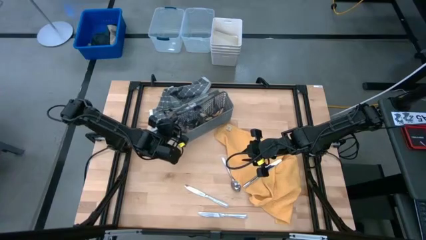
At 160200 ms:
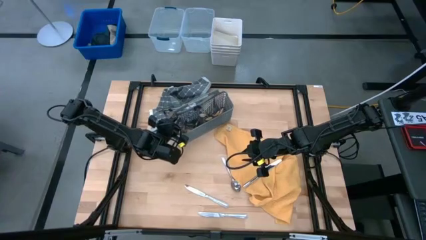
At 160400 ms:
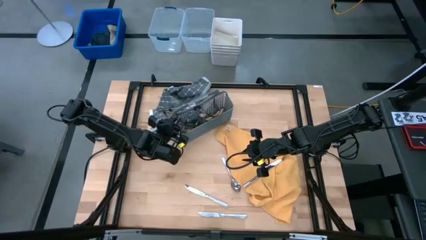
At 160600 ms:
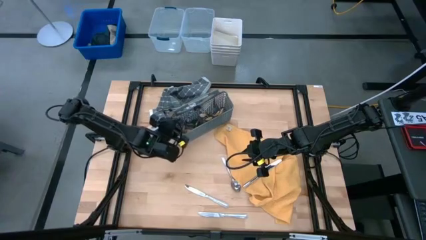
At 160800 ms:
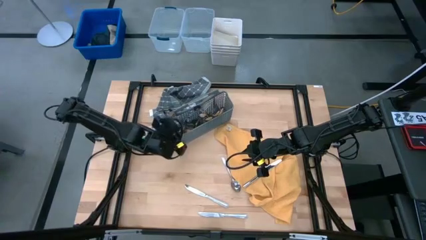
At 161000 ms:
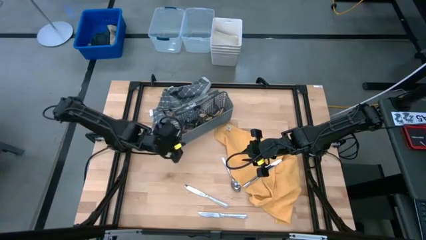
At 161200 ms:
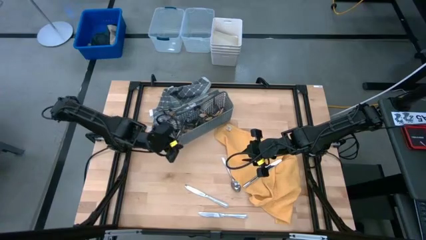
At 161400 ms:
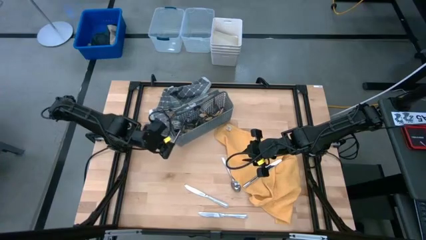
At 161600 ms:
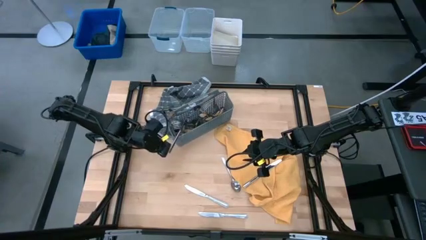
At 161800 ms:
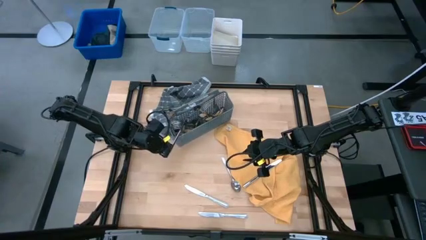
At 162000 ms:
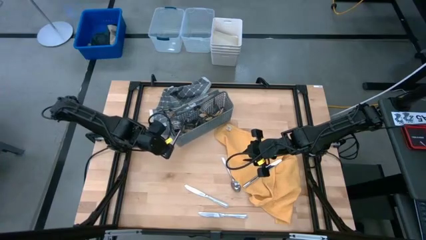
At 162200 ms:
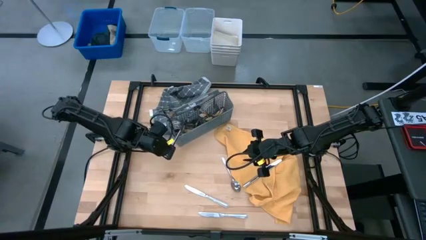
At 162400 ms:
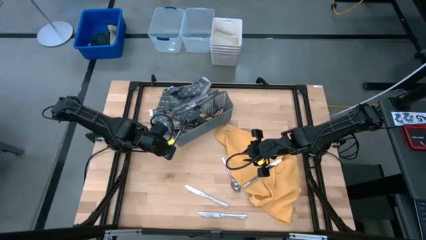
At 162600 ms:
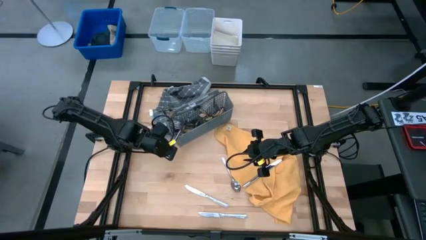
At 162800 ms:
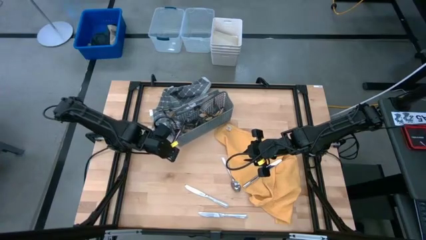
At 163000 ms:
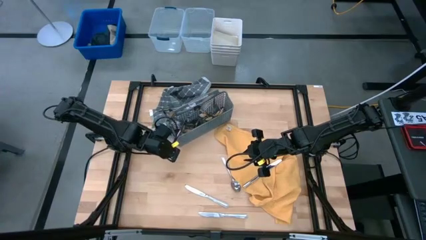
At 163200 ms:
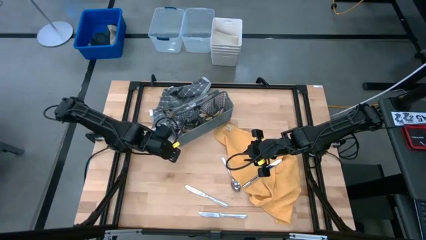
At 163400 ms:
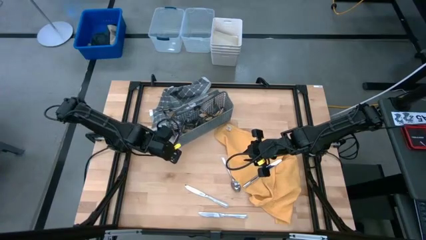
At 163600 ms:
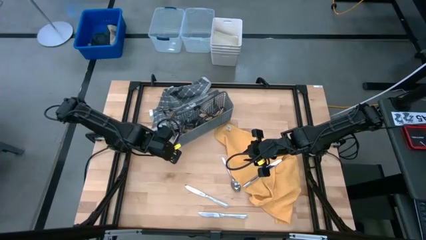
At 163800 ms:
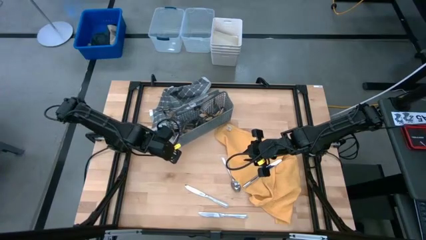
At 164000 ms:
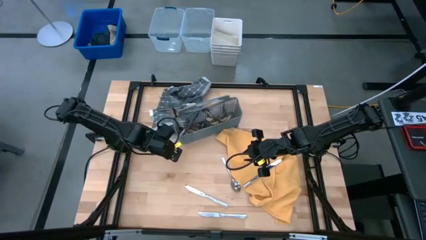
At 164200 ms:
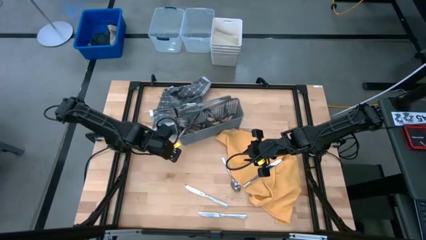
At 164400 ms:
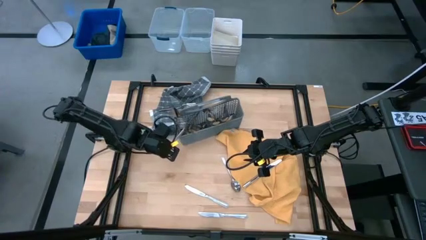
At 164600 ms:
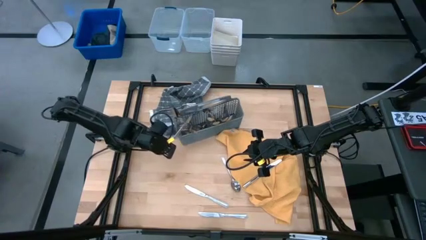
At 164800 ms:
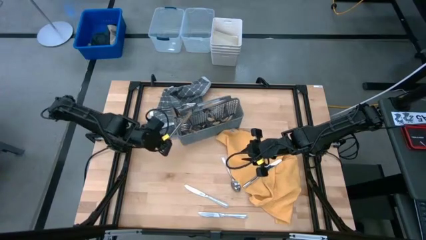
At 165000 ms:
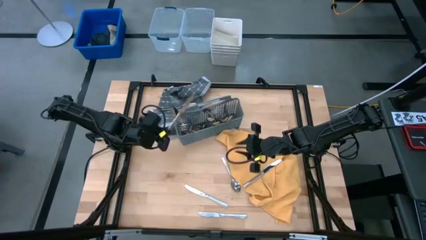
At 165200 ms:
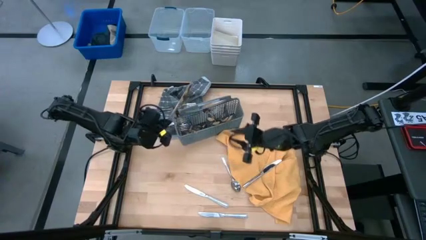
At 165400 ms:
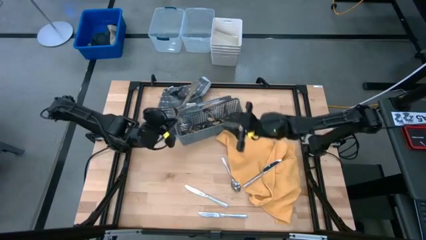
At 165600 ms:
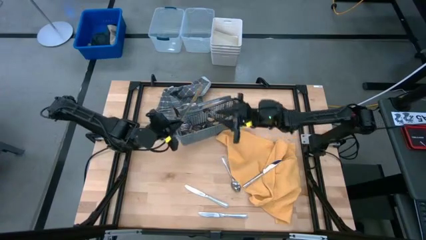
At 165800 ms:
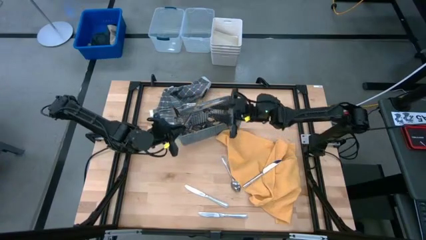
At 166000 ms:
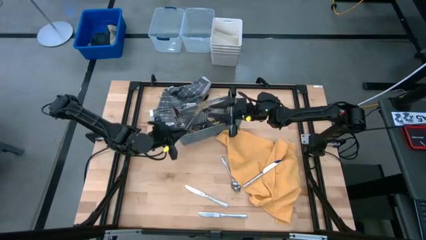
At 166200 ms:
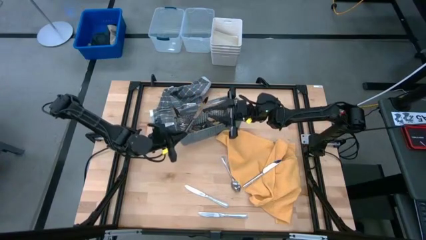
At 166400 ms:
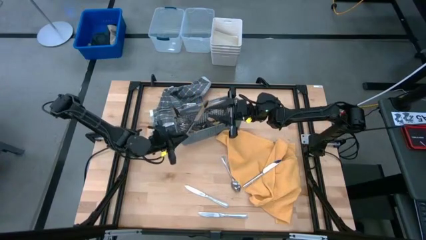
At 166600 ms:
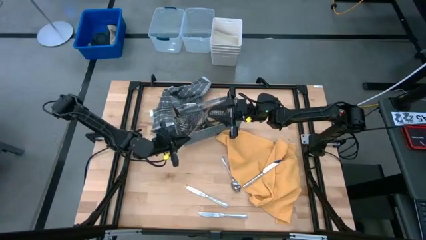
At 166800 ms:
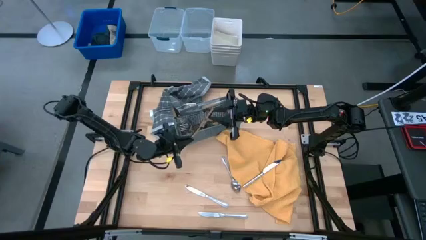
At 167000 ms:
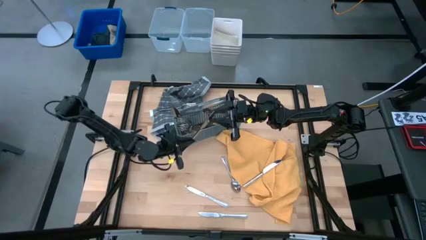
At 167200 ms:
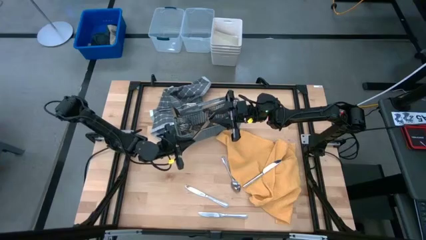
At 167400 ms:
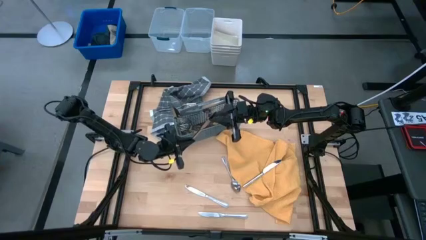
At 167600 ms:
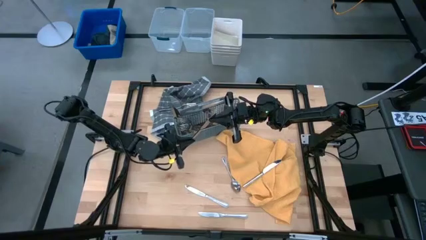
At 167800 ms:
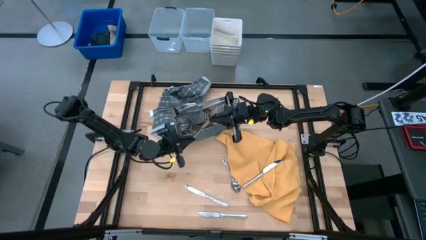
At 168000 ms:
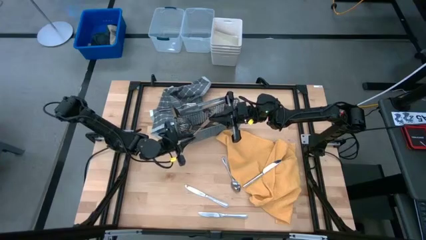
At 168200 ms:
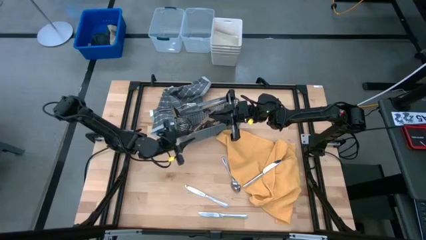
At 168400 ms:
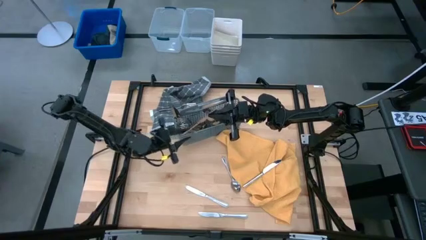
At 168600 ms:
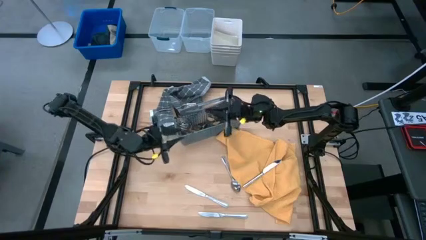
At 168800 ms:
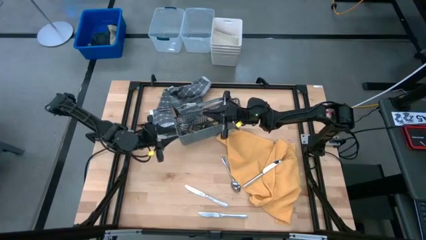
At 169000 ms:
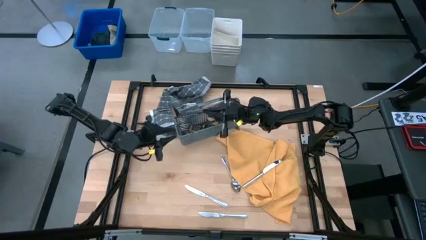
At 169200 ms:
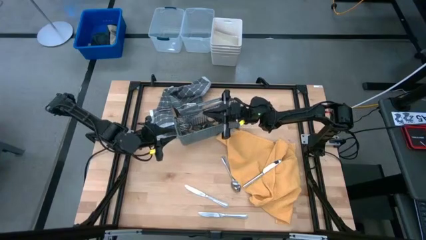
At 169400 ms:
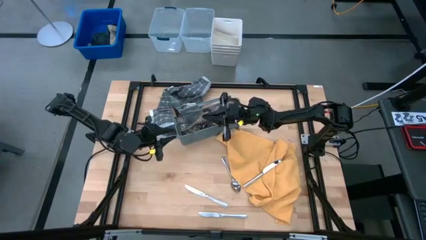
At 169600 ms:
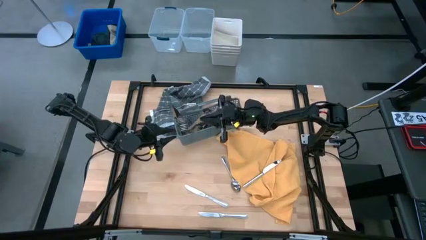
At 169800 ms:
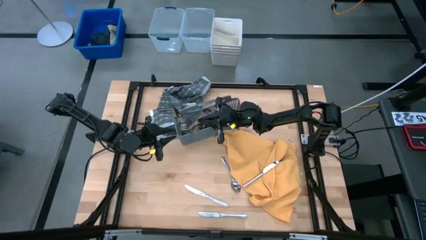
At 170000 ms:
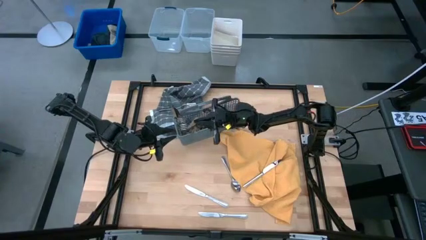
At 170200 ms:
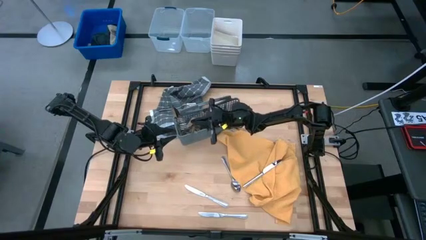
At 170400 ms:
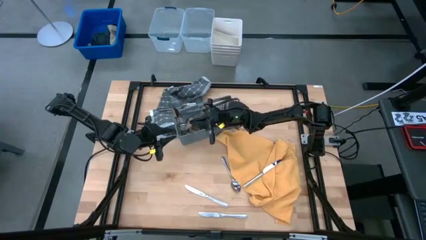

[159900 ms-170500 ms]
Task: Sort silverware
Put the silver knife into the gray silverware basket
